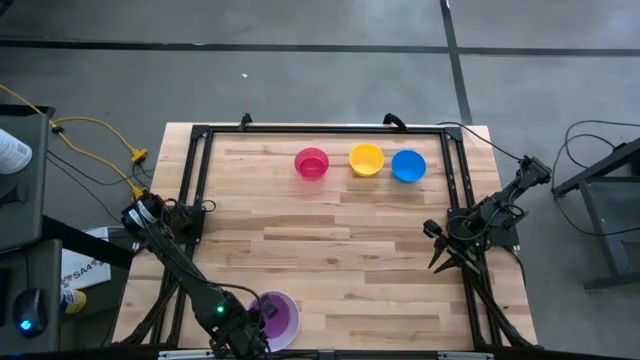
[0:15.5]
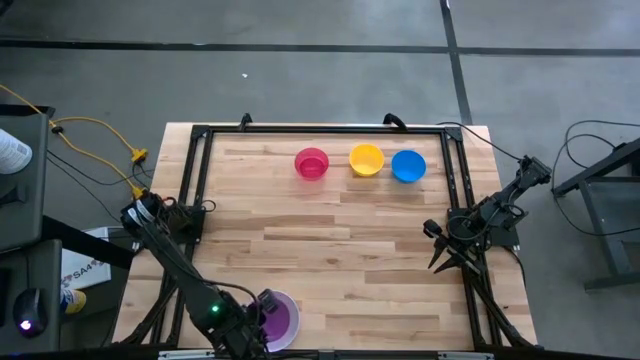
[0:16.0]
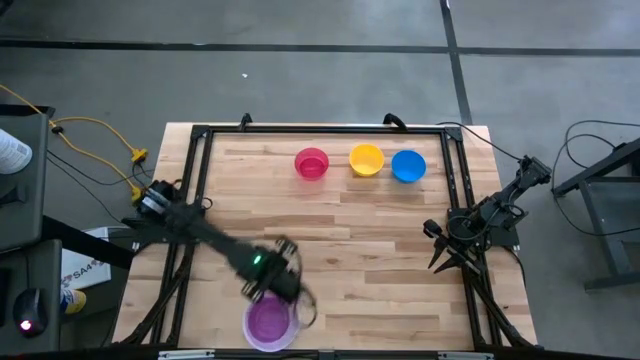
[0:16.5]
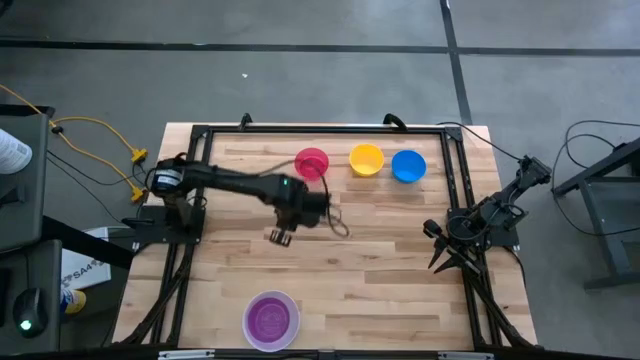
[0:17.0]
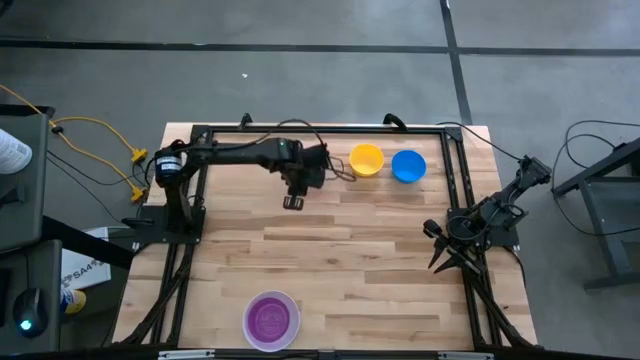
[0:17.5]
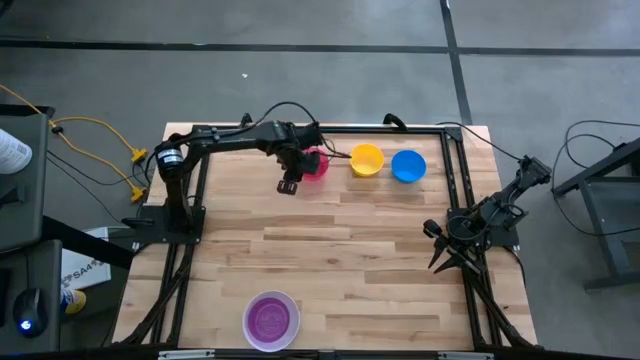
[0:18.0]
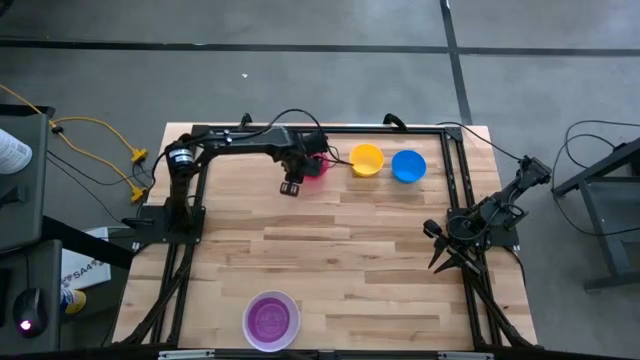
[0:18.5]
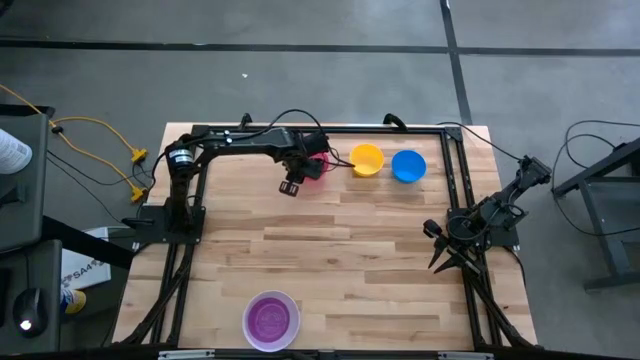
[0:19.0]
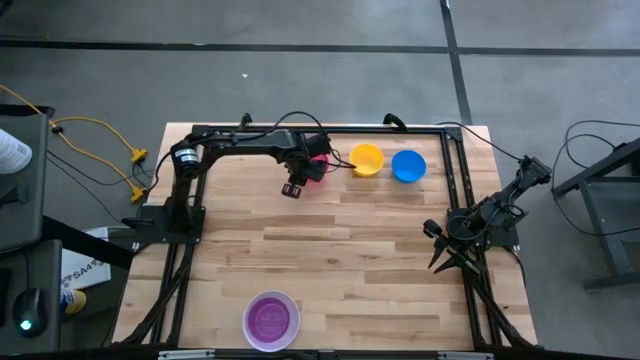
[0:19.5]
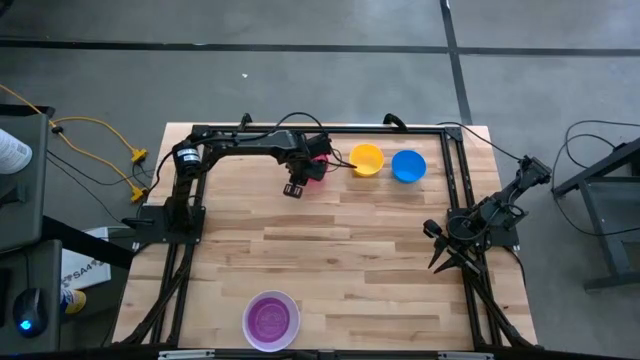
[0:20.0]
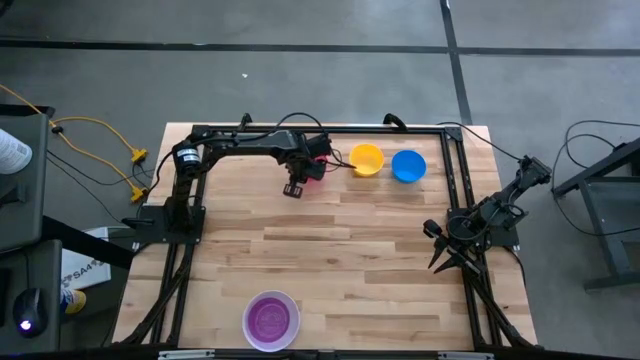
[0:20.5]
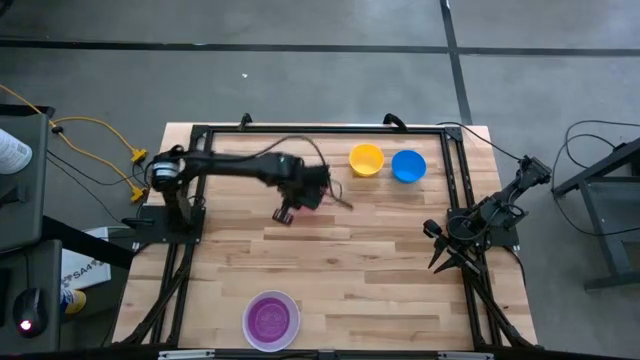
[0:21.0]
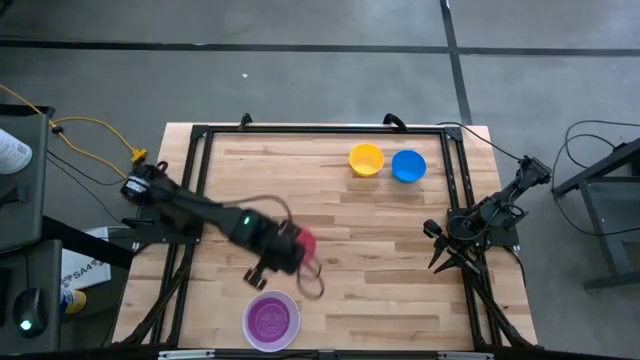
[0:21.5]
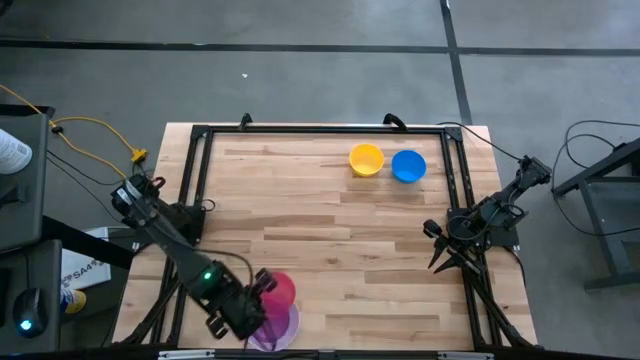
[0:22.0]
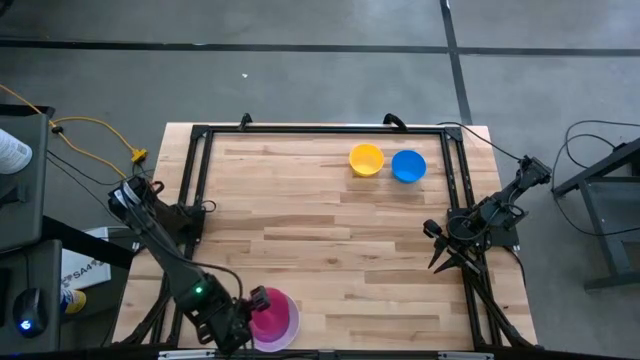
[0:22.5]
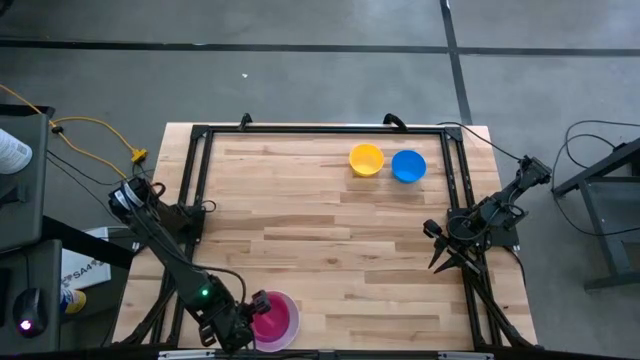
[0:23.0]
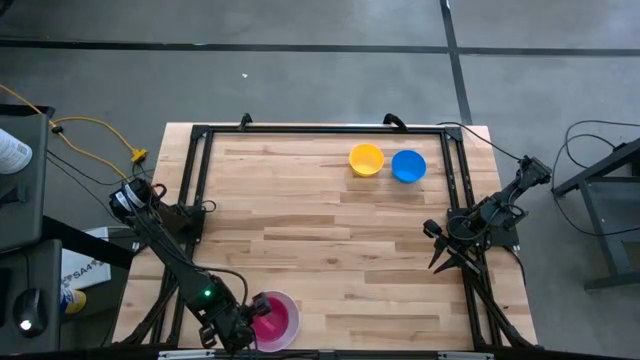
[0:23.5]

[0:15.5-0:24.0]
Stack the red bowl on top of the purple bowl

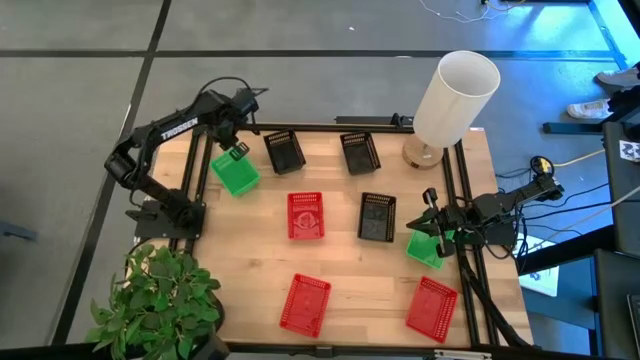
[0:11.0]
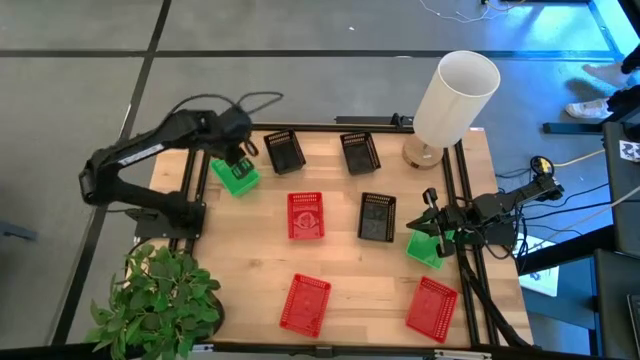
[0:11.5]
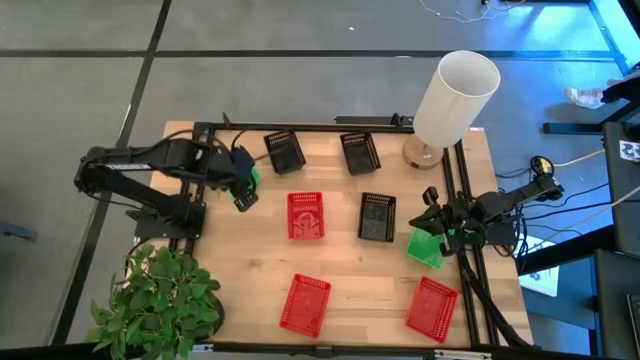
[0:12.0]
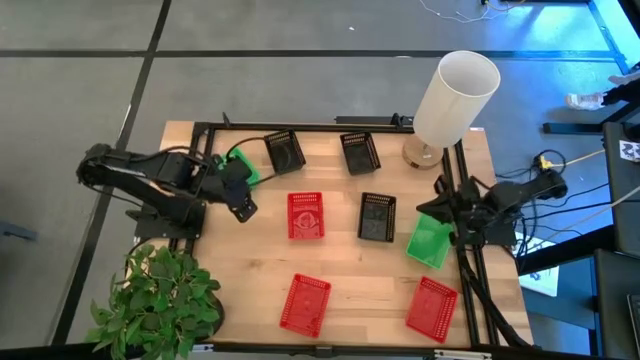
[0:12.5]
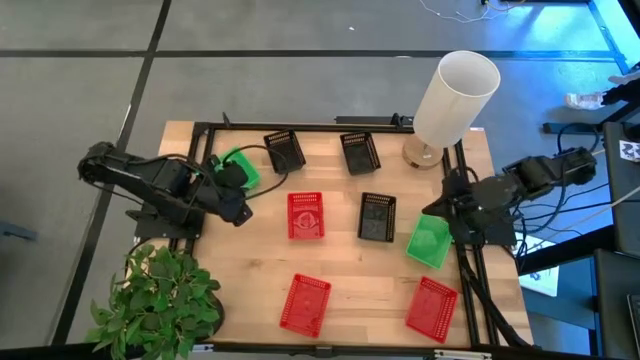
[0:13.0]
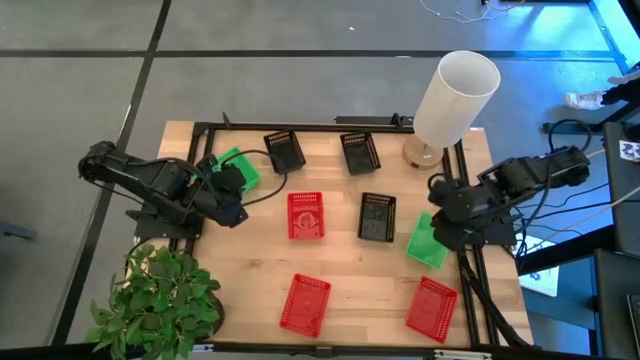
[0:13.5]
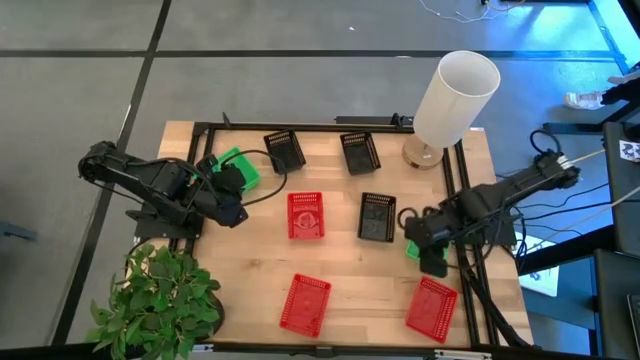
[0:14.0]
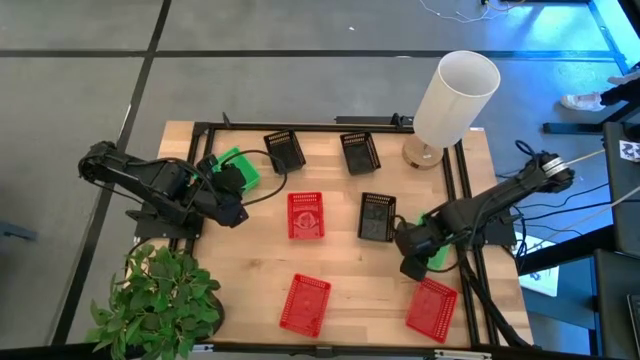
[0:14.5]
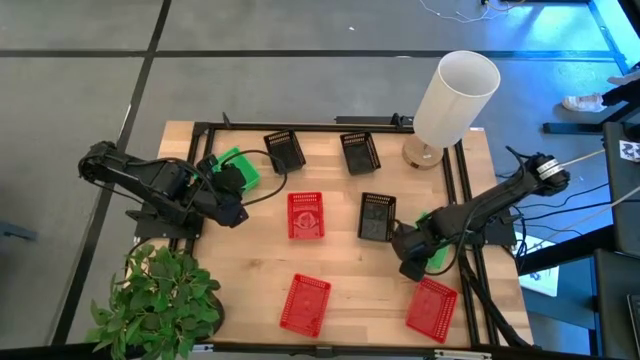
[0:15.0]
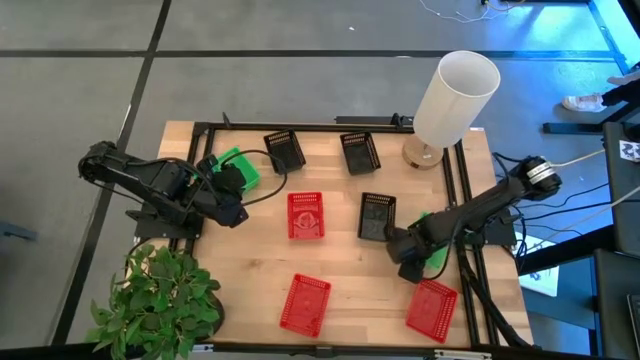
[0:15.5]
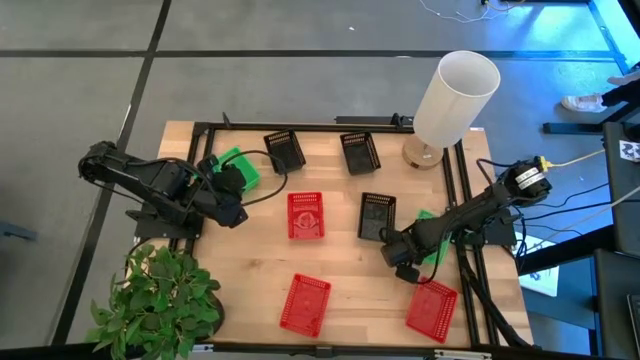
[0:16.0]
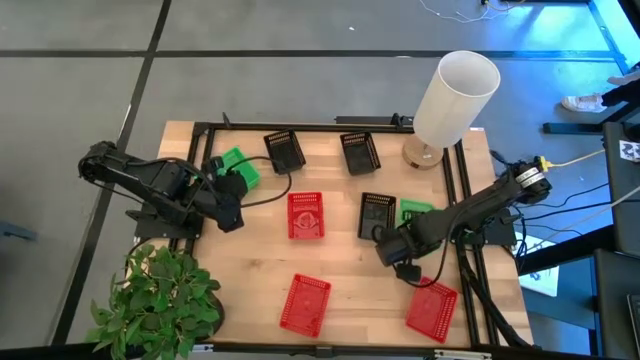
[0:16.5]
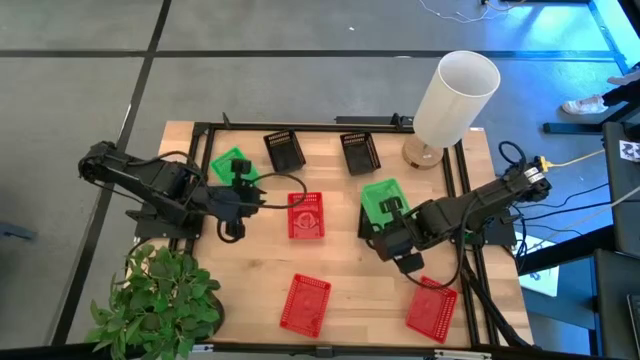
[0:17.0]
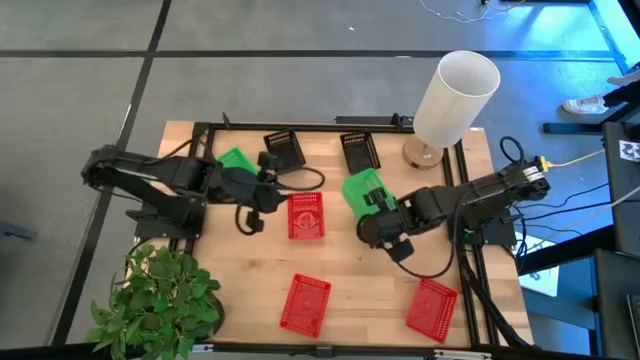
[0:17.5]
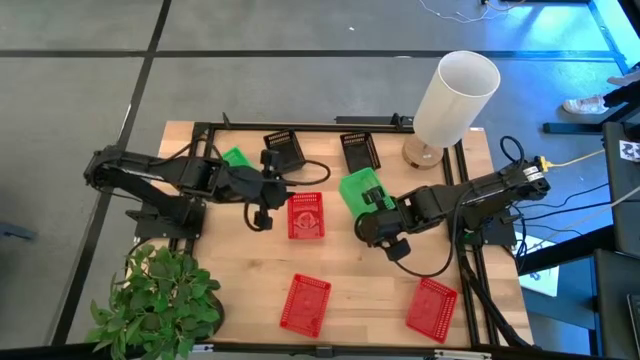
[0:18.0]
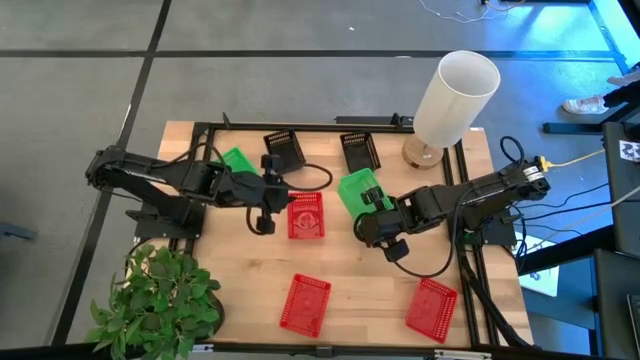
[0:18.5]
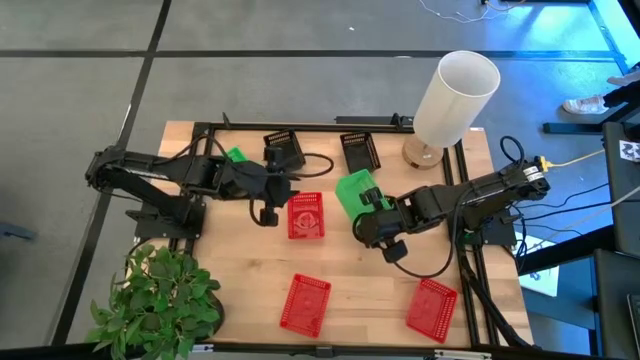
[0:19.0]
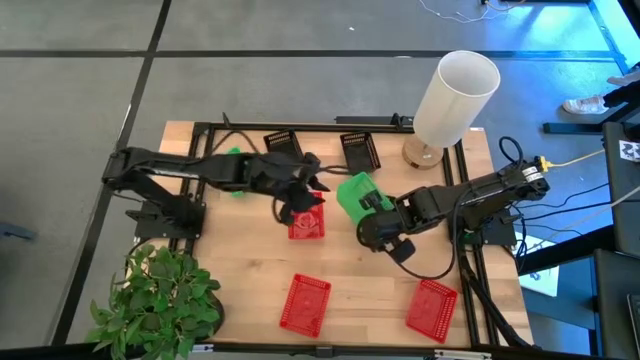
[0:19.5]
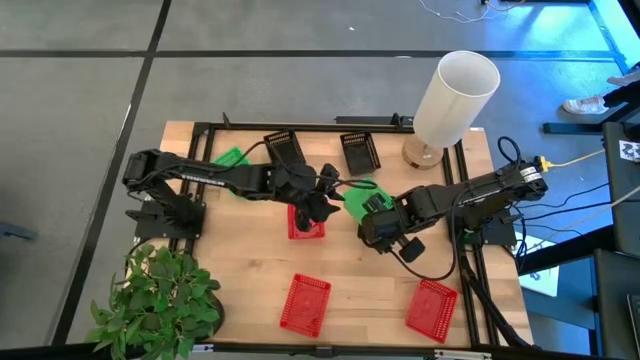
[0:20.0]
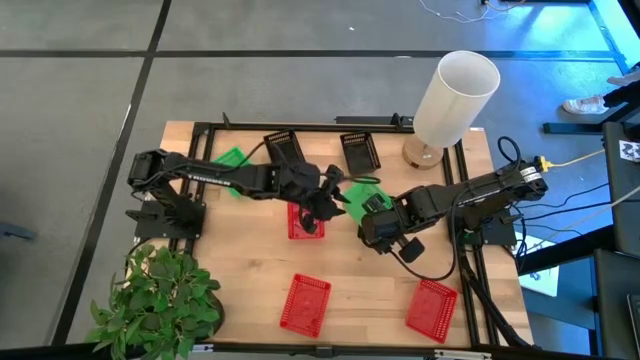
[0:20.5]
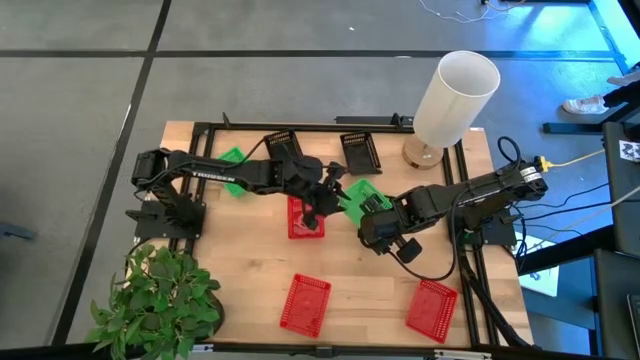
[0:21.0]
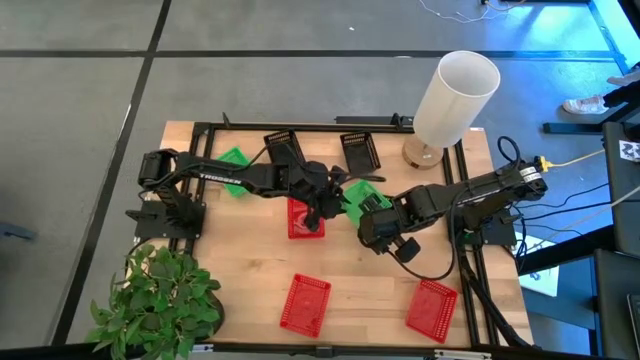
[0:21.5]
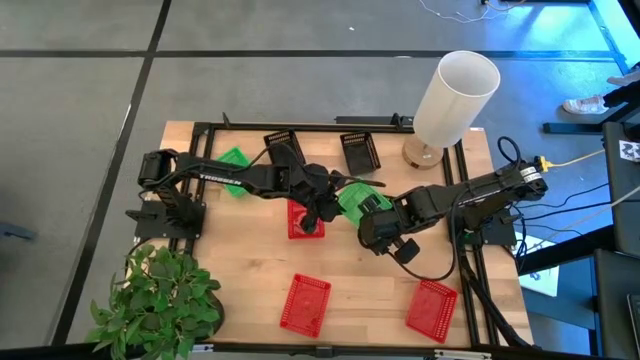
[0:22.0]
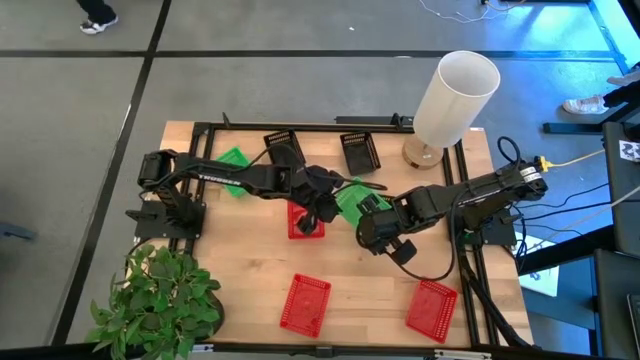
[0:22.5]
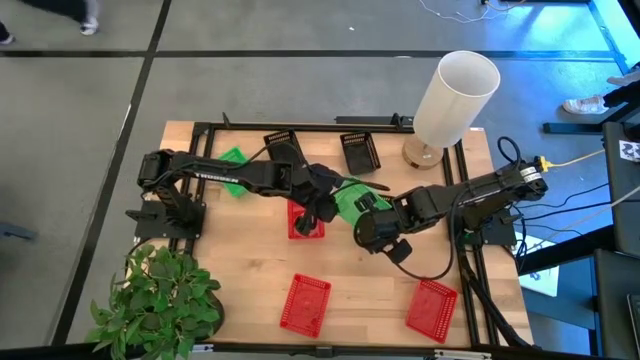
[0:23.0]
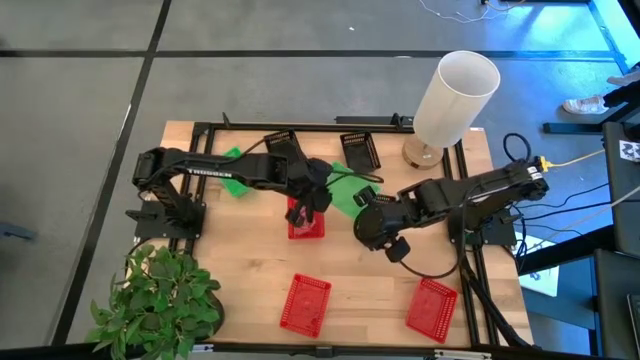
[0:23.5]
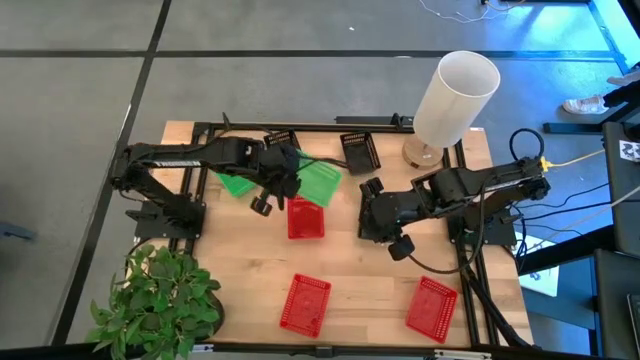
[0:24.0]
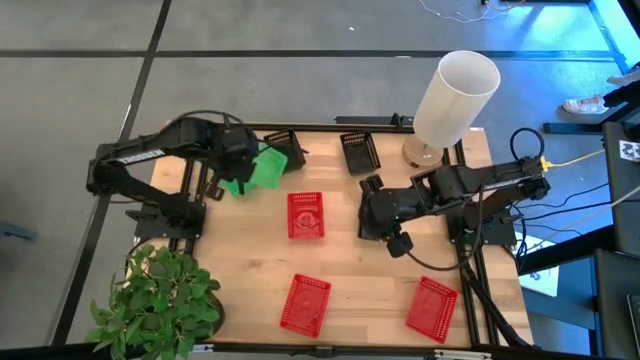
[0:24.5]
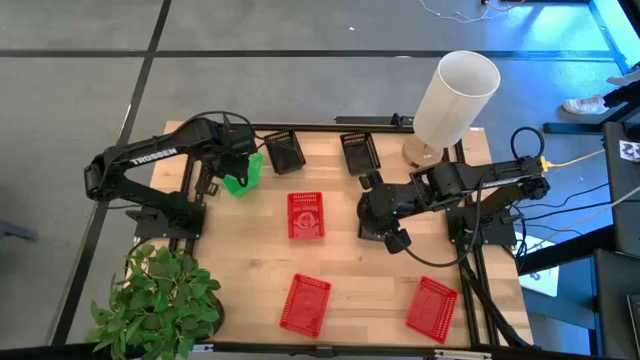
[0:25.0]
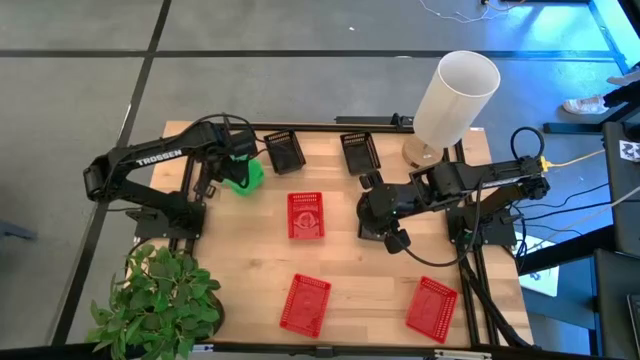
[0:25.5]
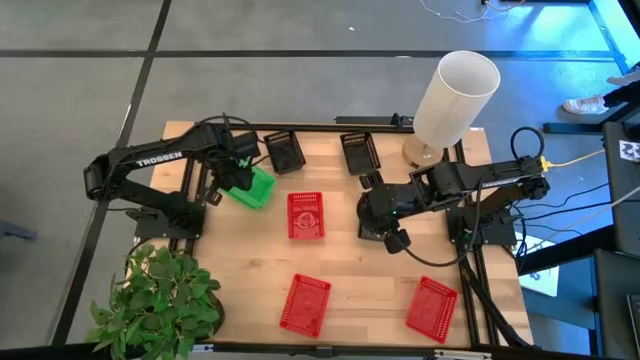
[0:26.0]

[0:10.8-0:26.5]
Stack the right green bin on the green bins
